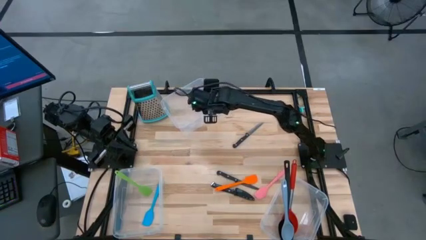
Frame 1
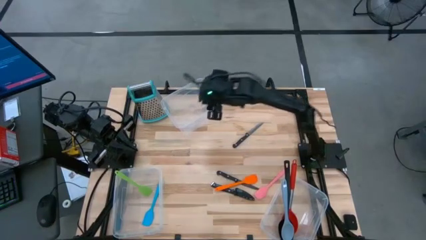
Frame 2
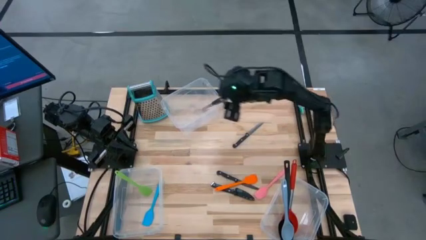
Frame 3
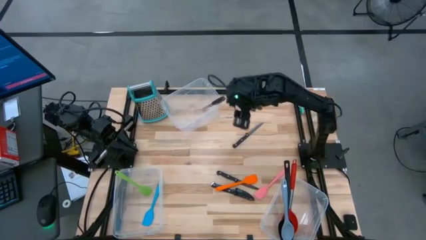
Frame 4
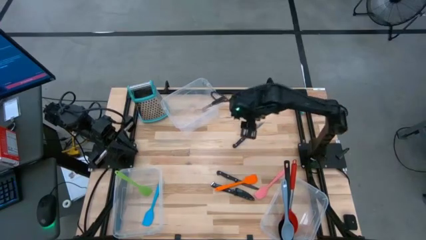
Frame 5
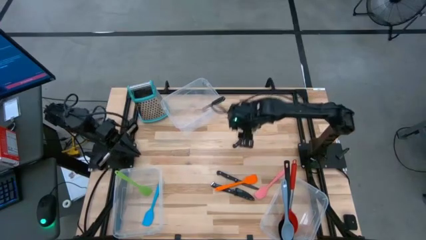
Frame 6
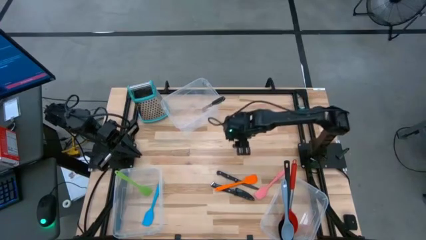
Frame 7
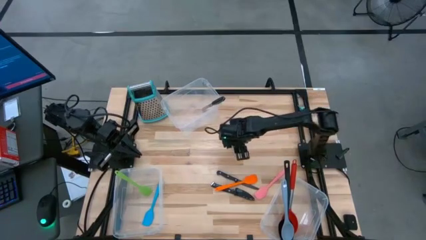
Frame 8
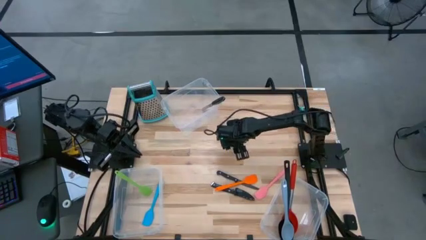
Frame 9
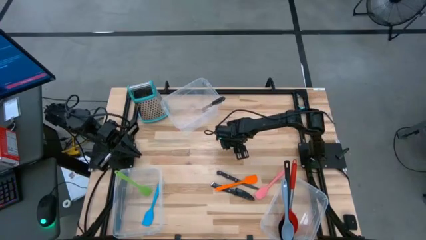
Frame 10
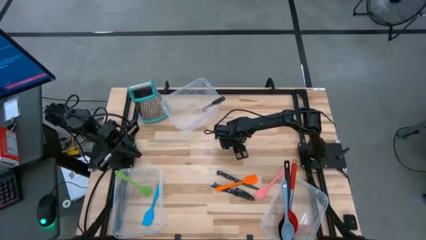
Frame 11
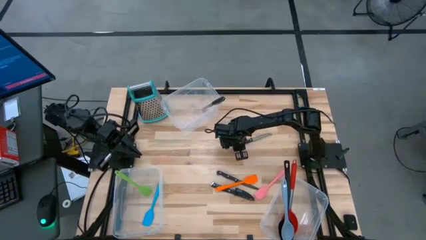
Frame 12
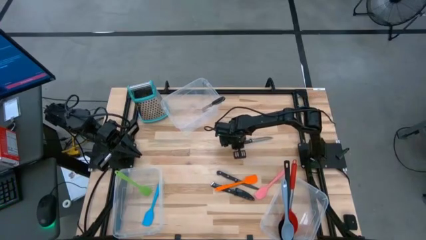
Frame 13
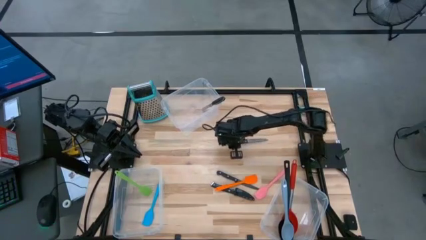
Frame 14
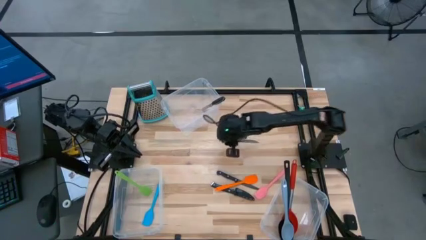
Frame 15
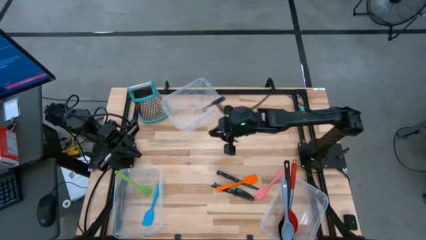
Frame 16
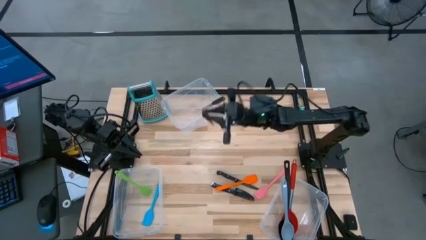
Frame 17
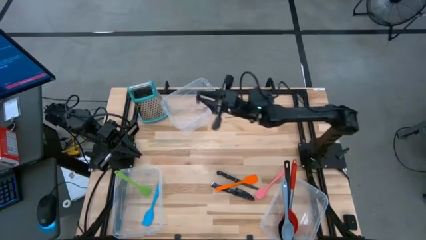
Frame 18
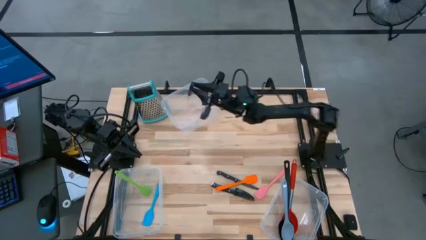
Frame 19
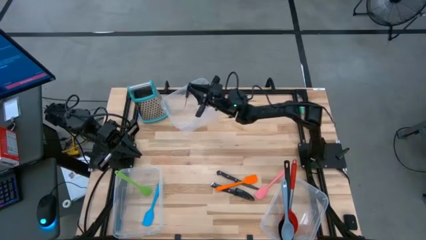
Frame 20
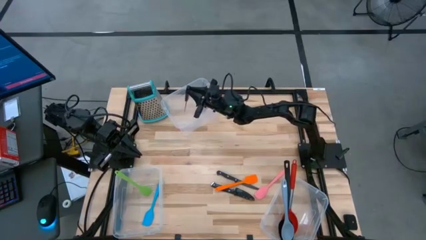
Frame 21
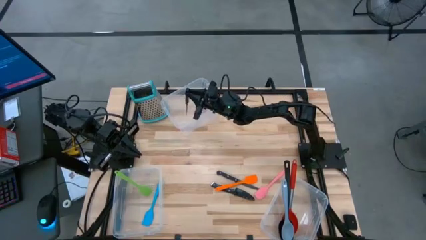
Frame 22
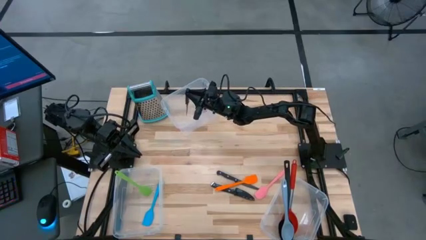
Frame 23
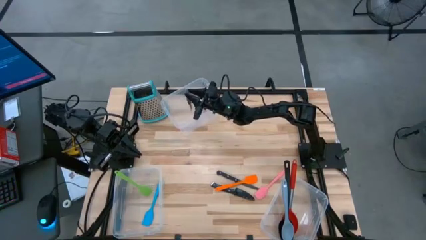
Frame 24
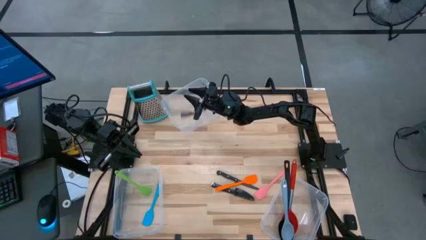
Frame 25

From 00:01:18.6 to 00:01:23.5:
Task: Pick & Place Kitchen Items
Put the black knife into the top transparent bin

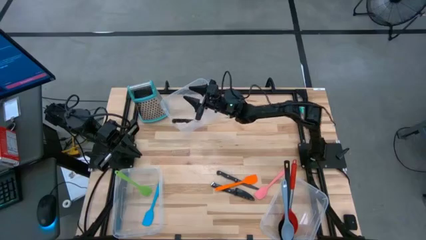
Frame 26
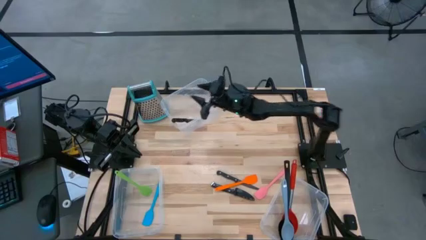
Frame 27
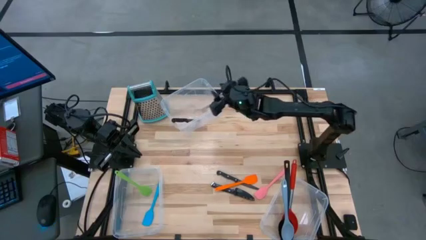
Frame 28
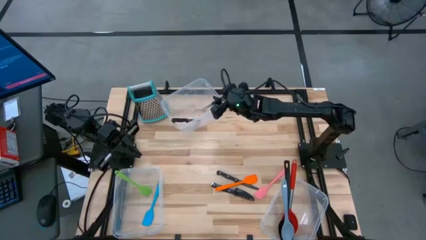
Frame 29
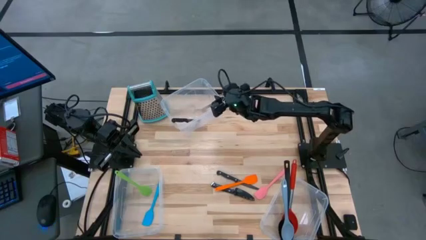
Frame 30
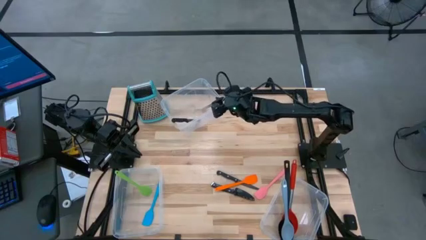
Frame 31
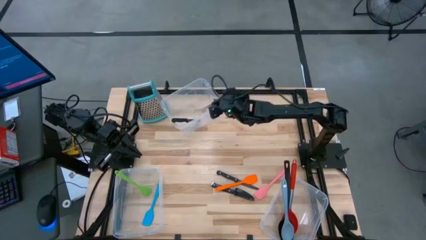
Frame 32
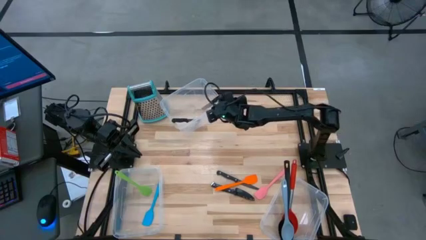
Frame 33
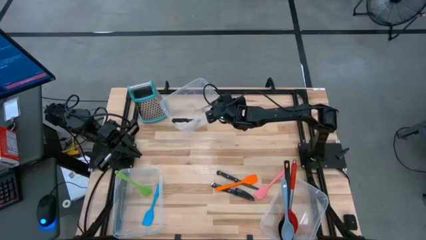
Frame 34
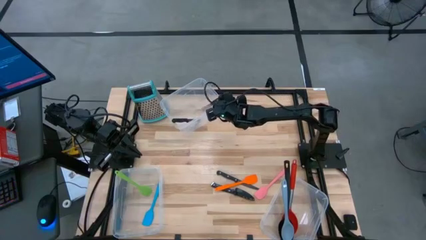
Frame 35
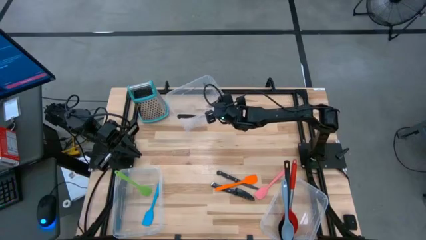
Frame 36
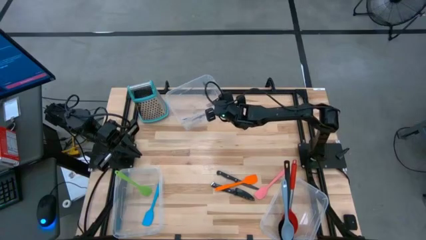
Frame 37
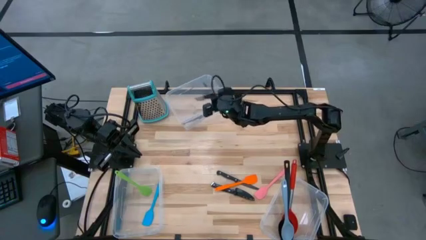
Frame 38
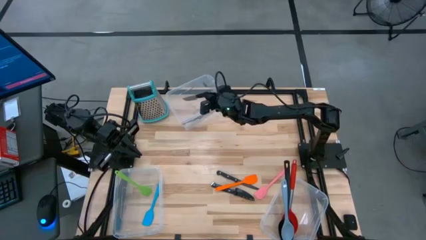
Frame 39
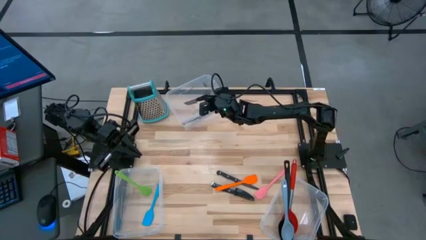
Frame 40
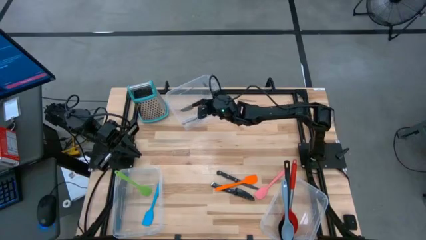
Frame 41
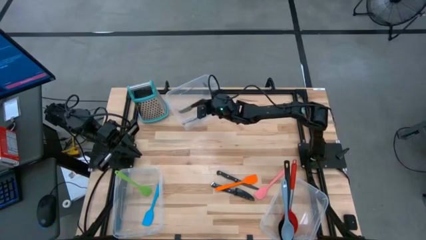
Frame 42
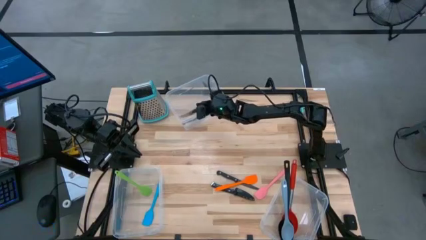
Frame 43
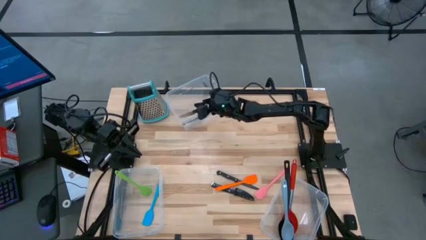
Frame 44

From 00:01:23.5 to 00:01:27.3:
Adjust the black knife in the top transparent bin

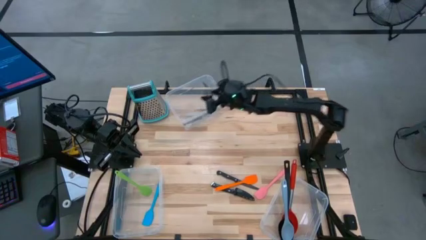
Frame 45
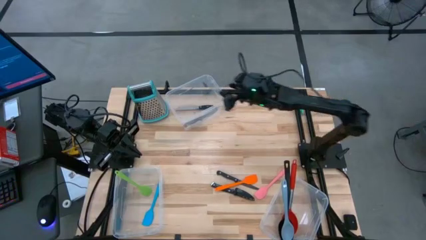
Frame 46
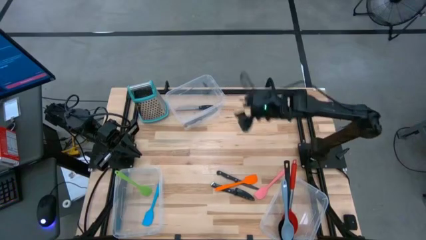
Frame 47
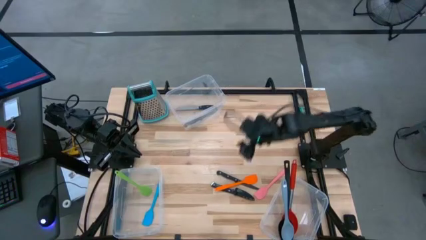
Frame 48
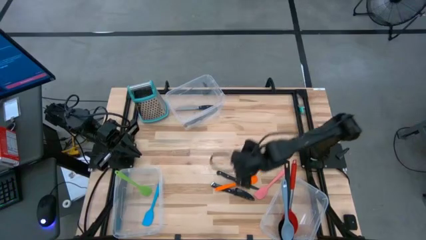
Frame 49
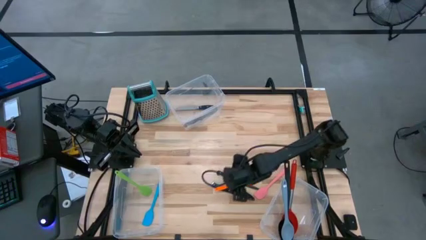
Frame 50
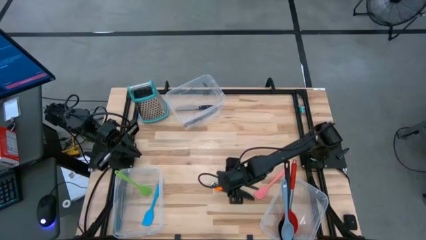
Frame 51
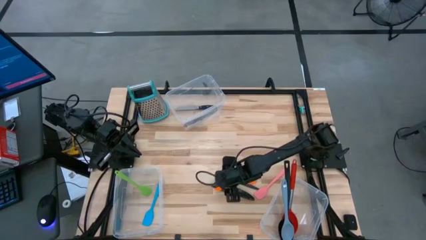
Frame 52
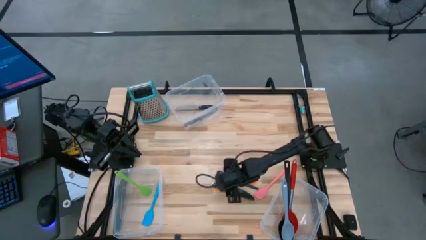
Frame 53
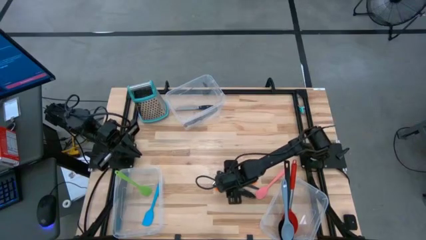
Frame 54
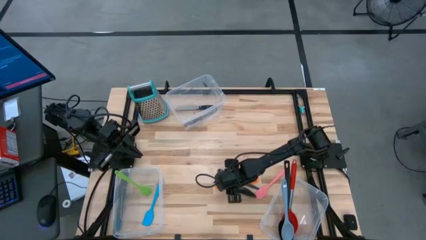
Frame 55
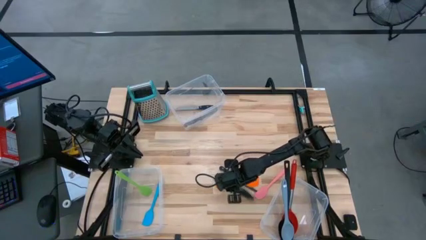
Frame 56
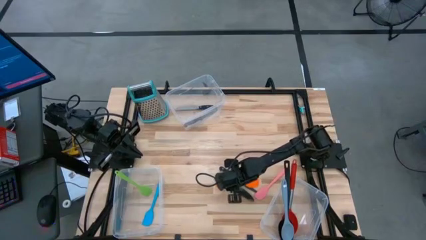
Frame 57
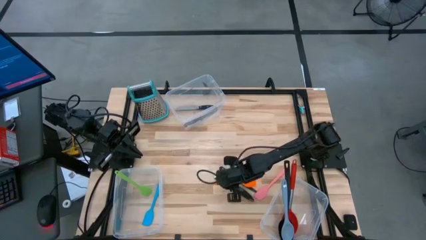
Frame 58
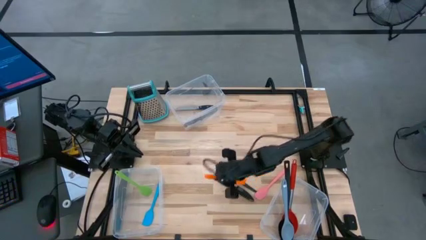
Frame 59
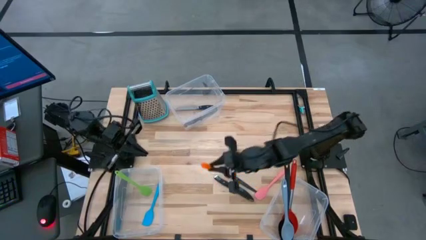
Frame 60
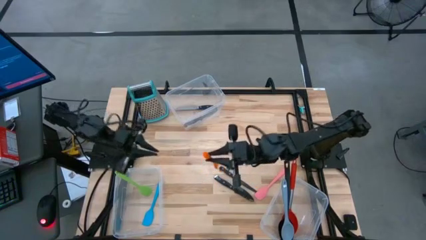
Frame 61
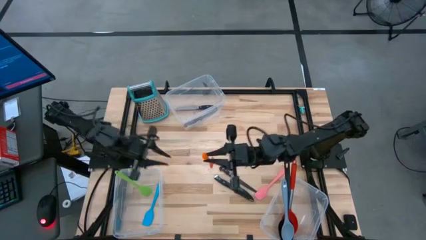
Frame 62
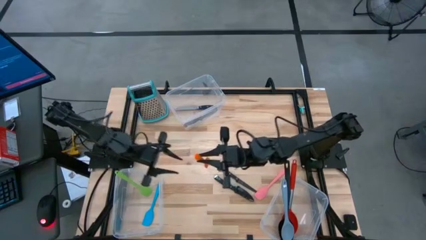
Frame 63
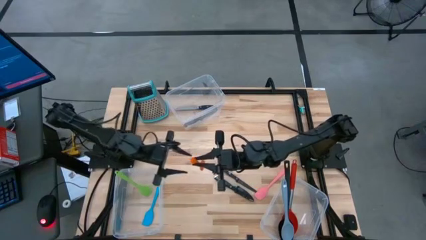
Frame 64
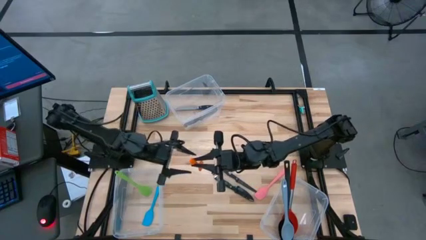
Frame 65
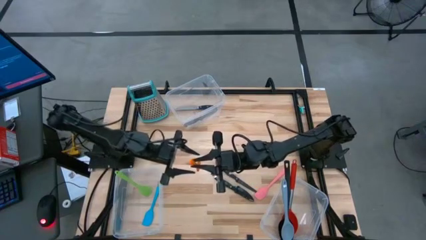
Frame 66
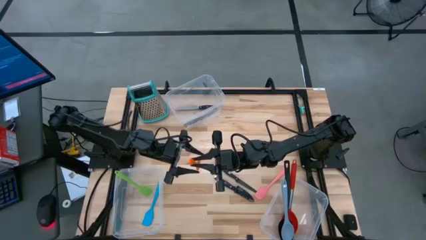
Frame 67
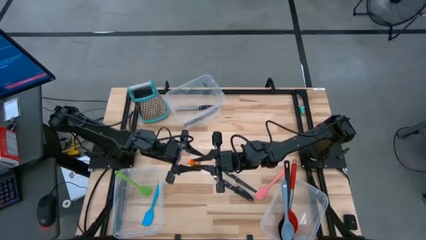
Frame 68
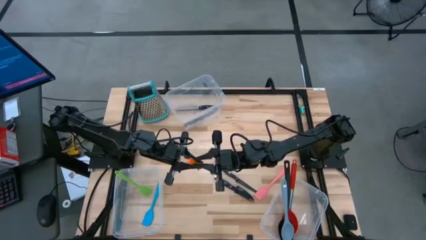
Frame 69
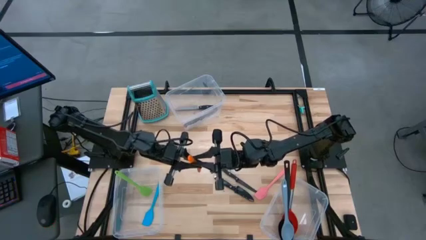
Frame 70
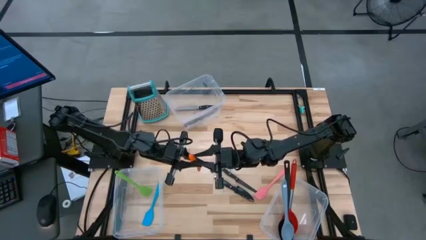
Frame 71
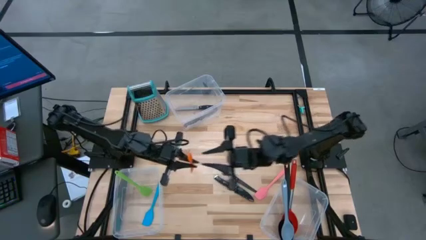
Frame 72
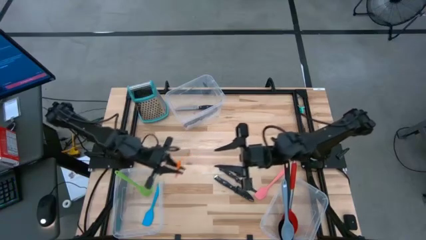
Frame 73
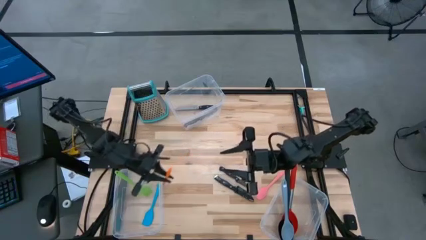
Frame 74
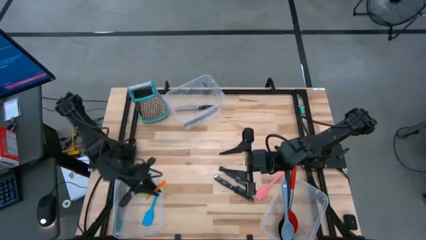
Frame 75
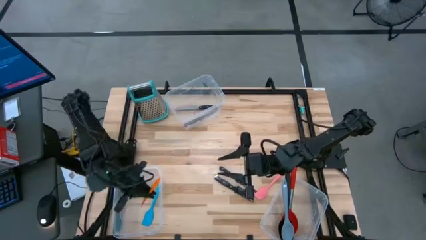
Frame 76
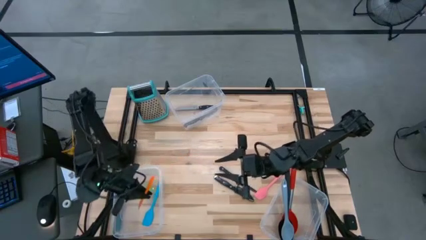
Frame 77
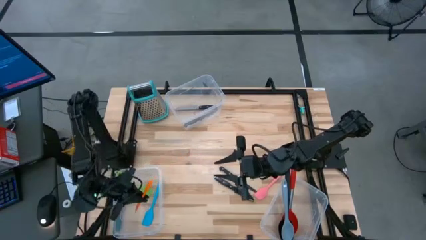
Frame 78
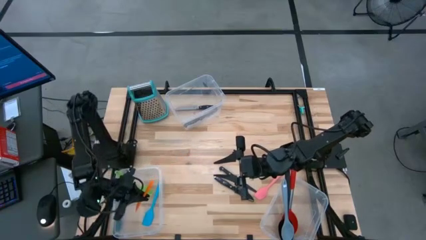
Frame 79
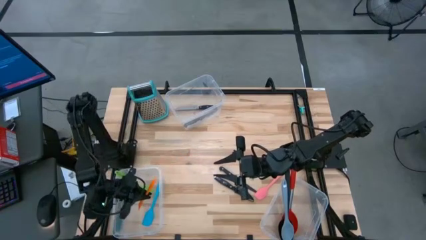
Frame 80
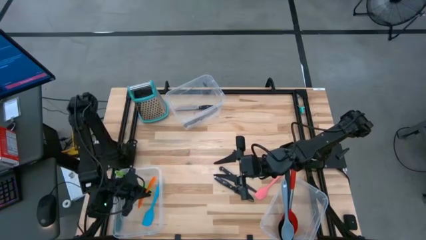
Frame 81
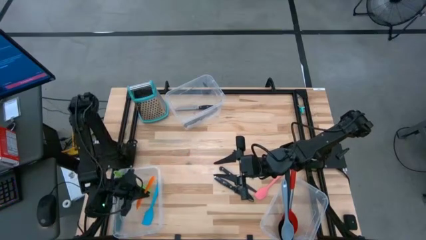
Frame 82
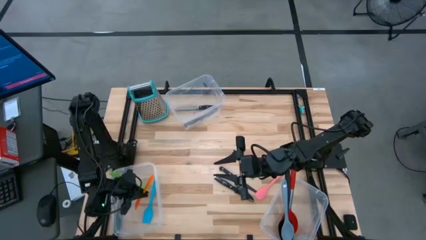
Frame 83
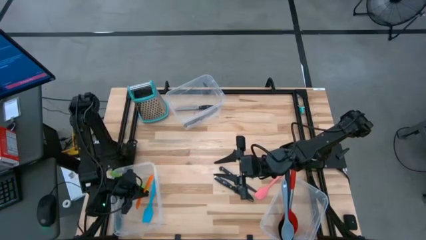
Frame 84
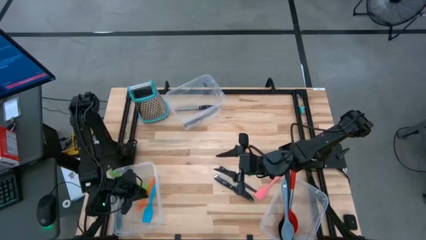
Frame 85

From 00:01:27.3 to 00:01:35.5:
Put the orange spatula into the bottom left transparent bin
